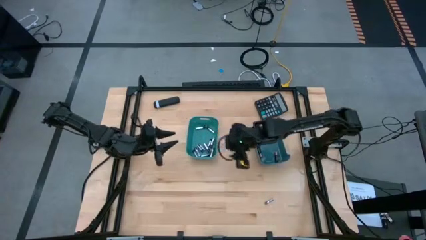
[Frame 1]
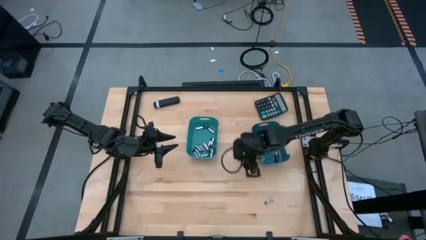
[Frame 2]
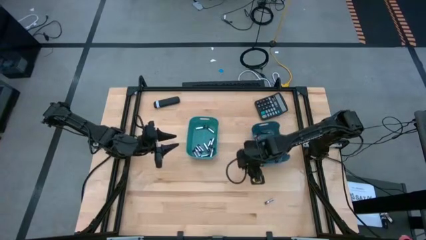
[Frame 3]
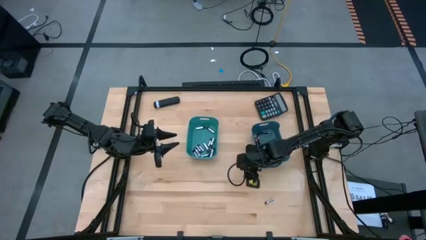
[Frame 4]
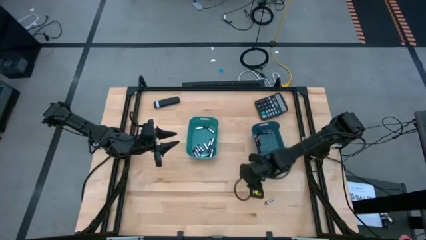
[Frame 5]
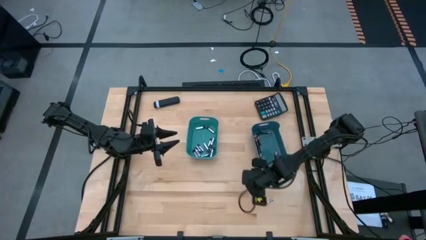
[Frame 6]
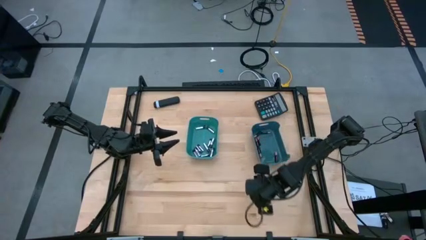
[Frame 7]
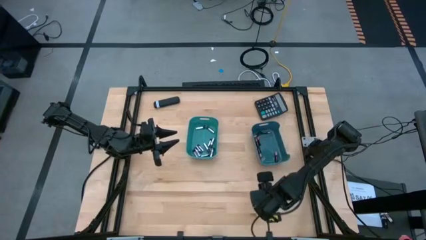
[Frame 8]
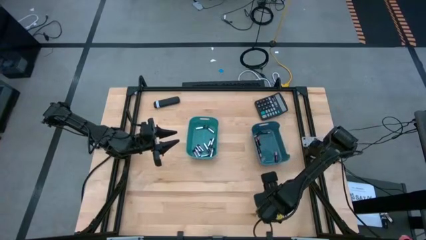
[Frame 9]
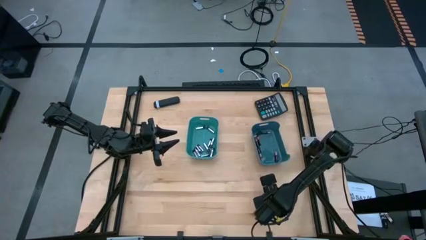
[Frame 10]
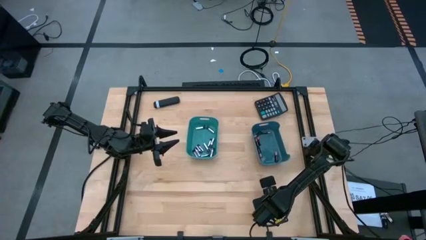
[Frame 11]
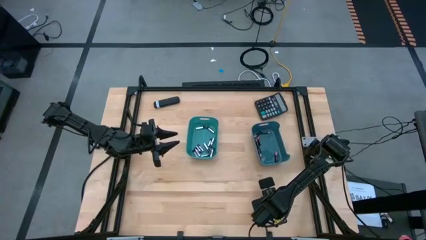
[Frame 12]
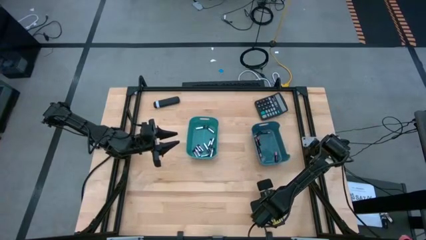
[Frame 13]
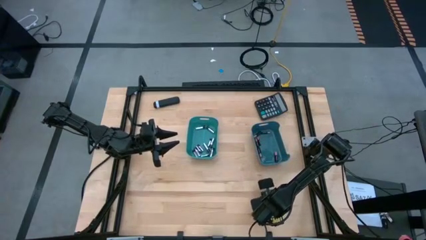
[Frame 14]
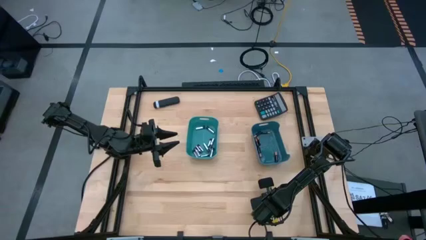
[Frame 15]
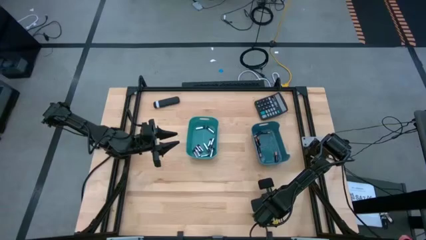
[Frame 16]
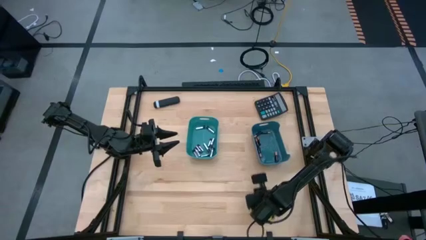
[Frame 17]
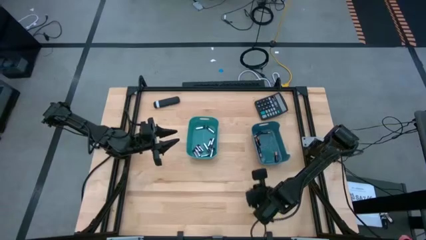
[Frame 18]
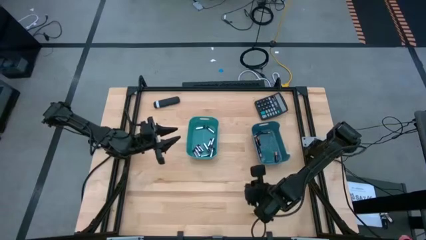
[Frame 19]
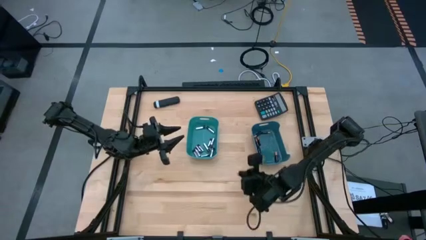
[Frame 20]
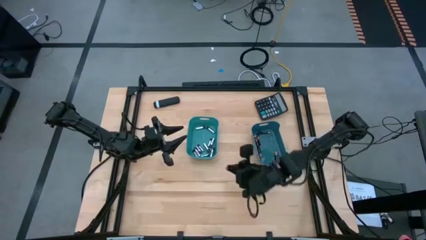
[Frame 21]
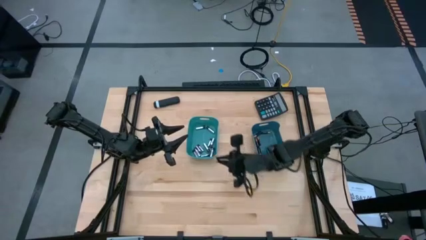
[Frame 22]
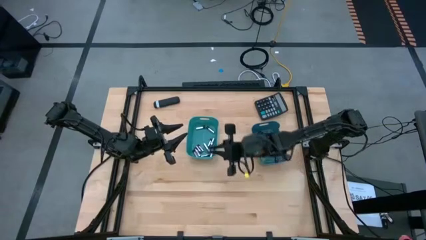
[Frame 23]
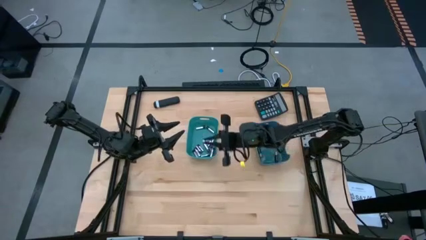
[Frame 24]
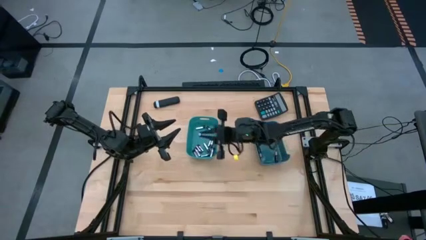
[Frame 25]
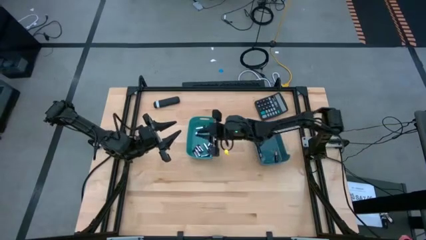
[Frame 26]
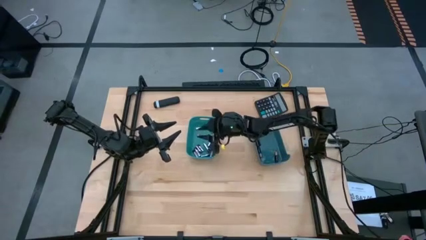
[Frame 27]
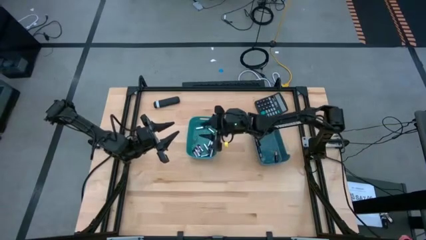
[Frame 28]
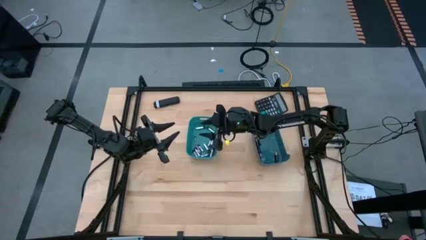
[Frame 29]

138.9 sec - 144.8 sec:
Task: Sort batteries
Put the silver battery into the green bin

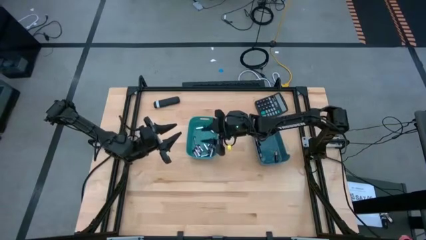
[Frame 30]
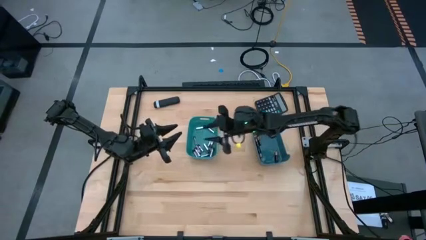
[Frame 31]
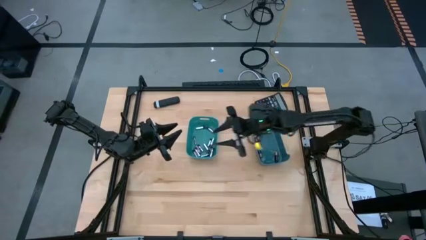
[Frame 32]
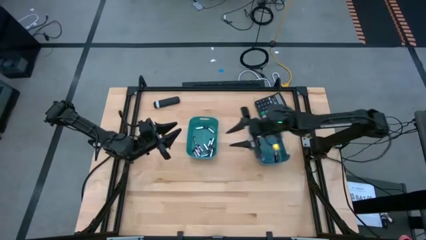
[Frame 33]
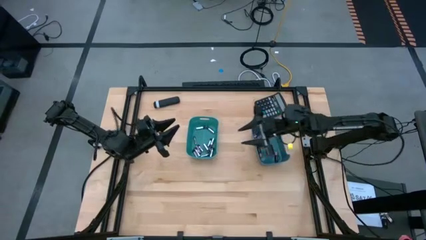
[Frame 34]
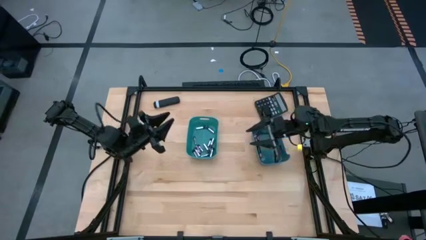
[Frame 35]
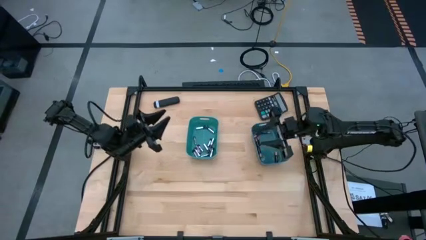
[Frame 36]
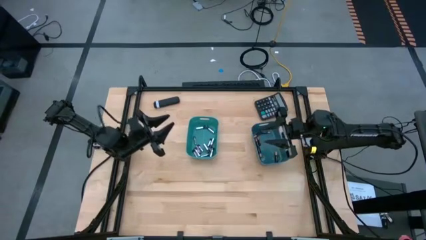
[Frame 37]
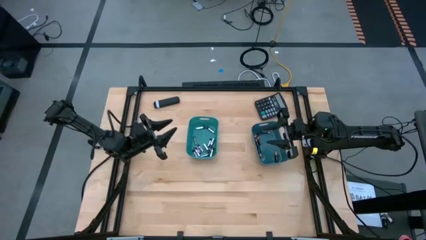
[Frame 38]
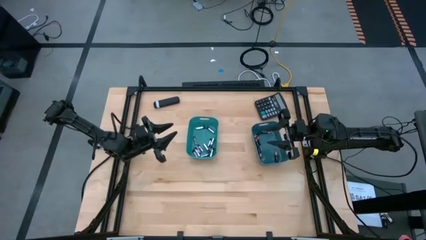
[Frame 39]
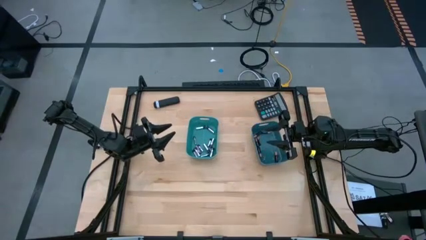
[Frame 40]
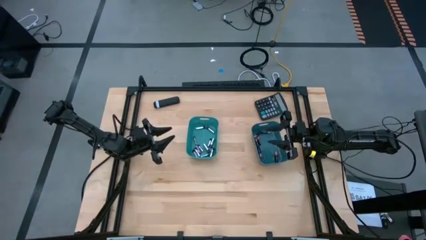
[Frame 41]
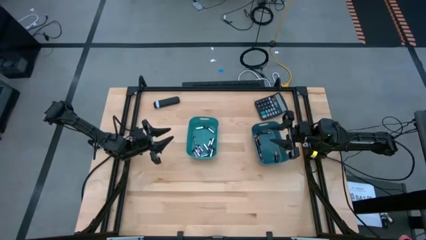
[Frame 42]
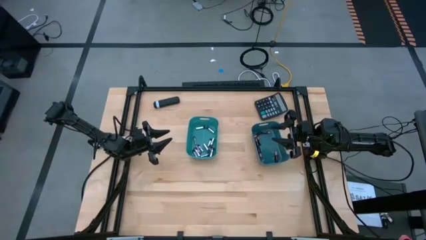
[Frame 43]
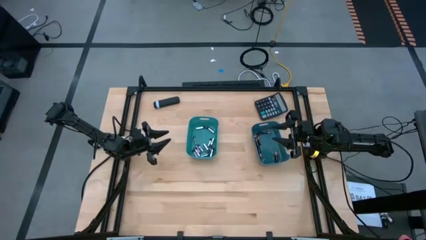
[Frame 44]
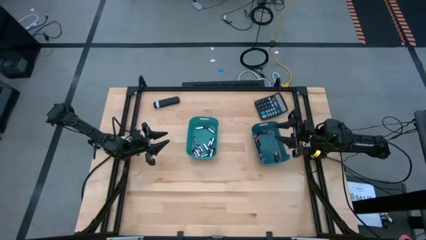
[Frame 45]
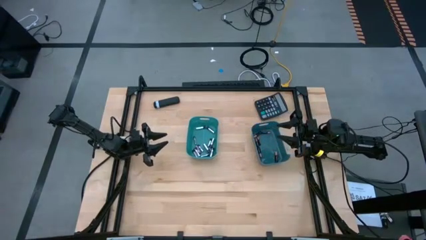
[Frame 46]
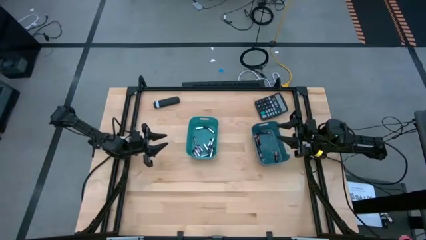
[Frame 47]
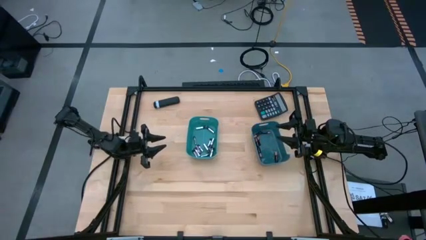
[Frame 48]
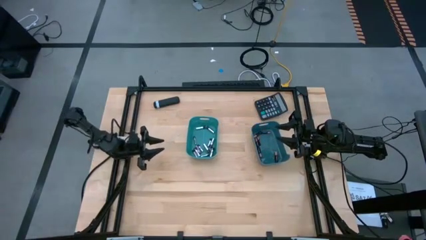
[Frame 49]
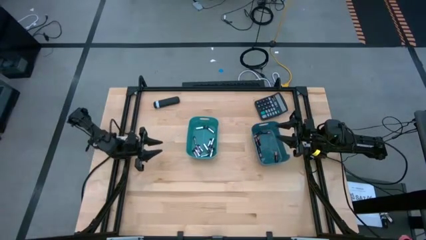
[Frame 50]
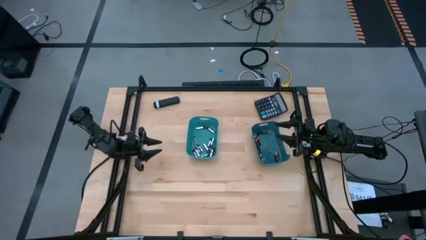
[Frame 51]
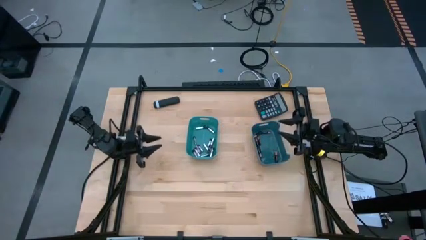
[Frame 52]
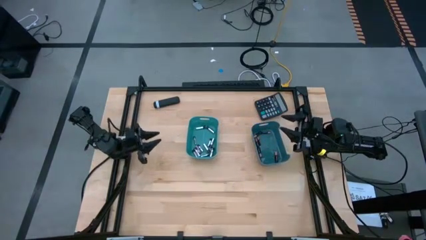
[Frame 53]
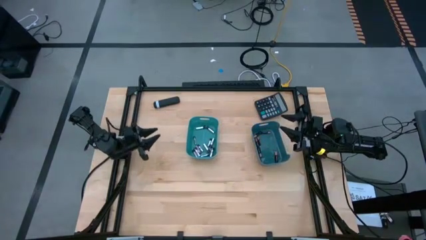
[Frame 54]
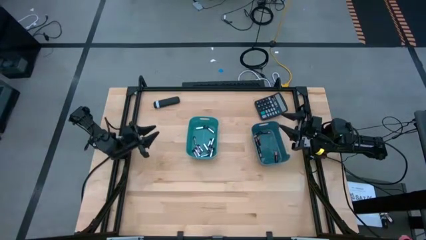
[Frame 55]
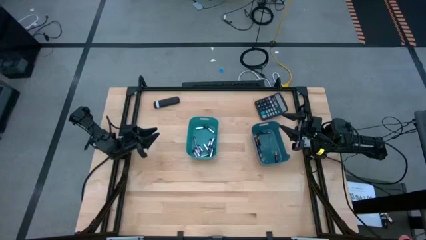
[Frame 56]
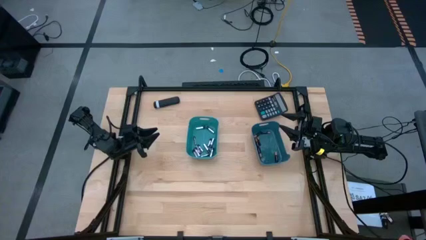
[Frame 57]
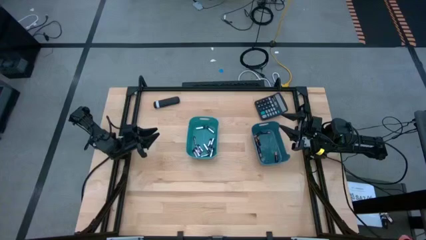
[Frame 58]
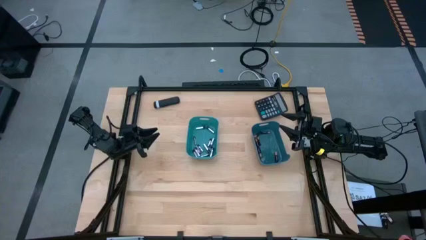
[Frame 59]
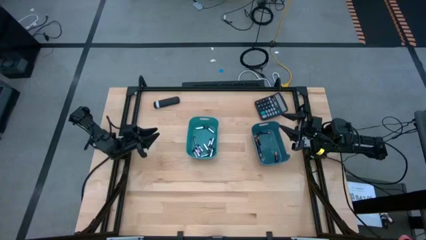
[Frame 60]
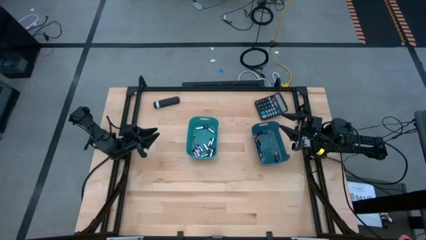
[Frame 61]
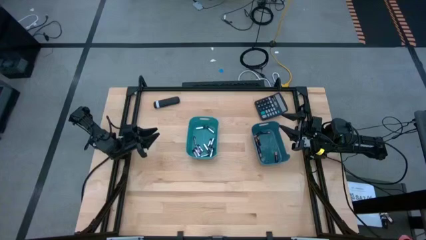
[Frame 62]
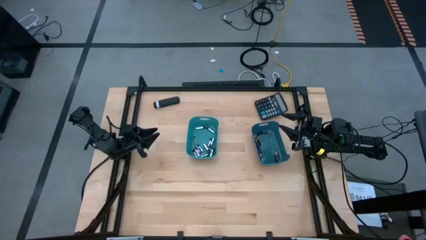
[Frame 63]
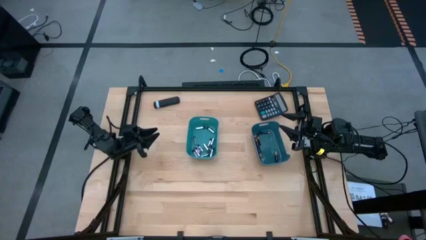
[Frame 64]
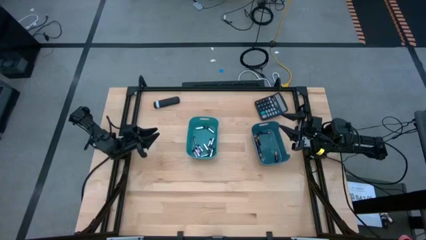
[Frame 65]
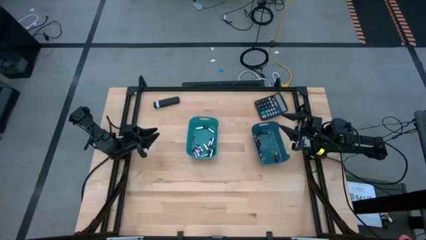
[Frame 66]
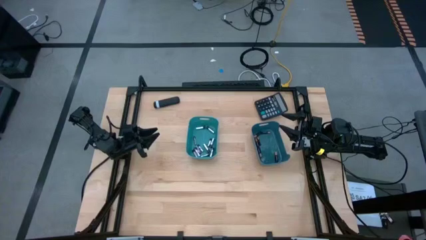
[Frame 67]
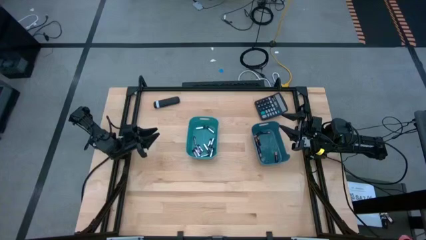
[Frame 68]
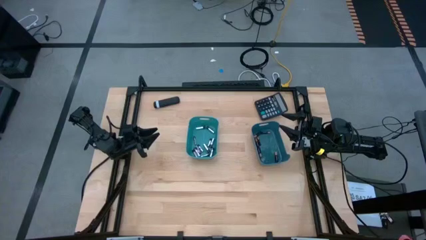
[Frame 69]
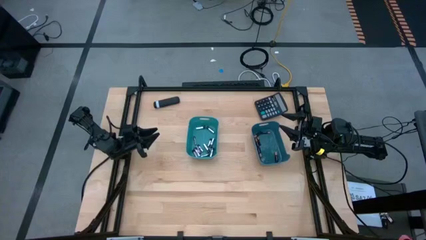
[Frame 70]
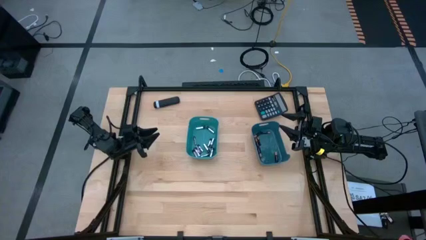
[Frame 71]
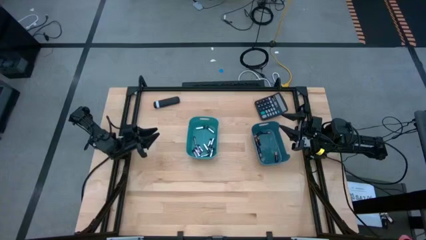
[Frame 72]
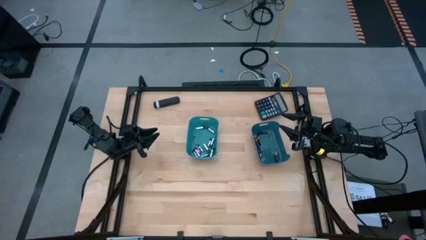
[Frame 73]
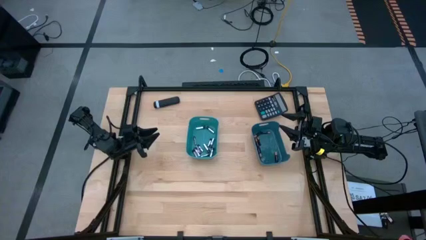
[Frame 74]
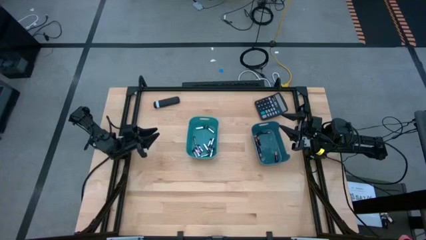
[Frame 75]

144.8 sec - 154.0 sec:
Return to Home position

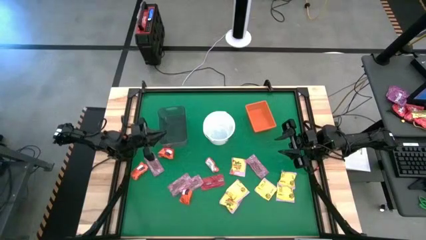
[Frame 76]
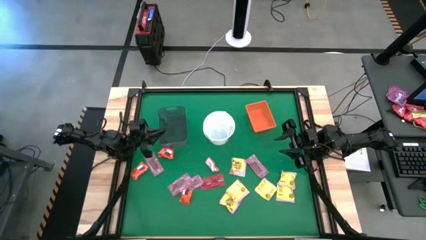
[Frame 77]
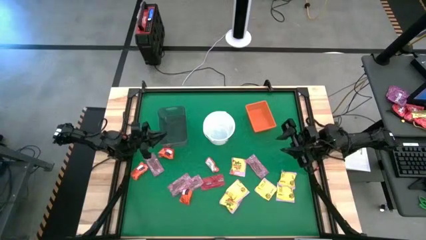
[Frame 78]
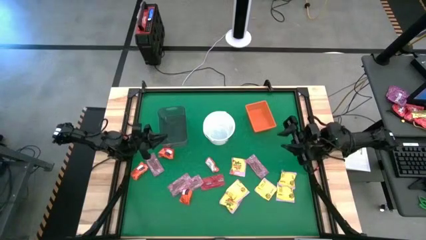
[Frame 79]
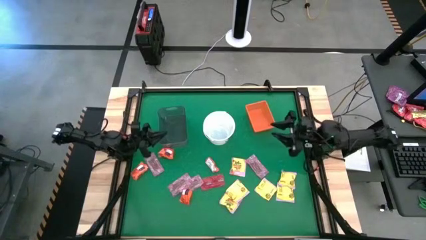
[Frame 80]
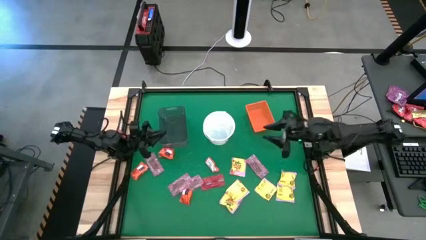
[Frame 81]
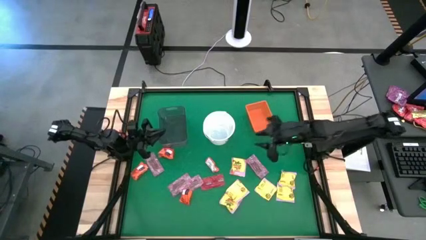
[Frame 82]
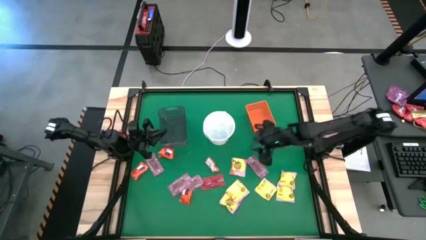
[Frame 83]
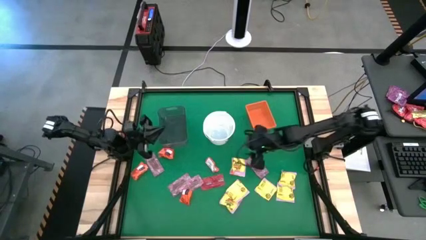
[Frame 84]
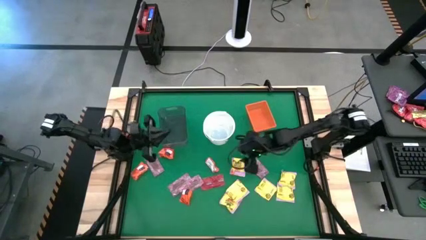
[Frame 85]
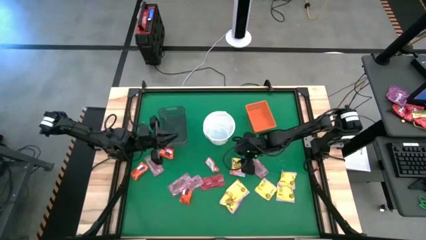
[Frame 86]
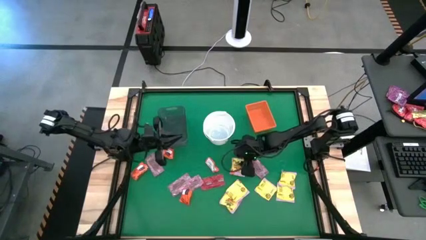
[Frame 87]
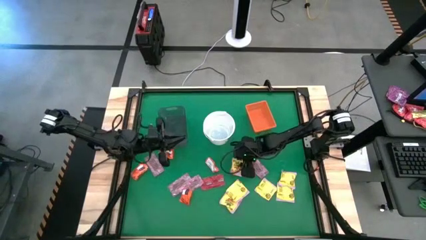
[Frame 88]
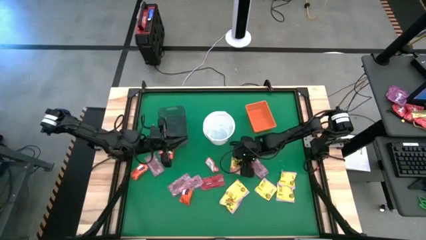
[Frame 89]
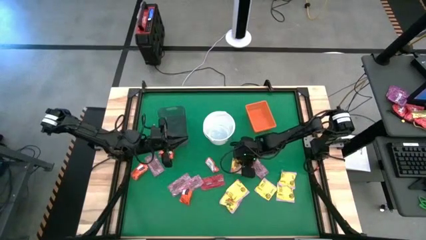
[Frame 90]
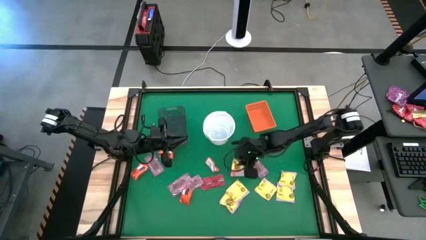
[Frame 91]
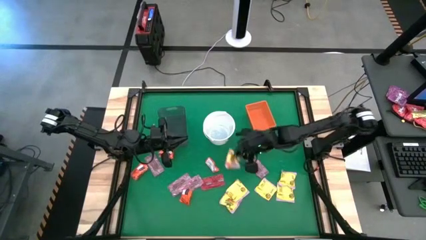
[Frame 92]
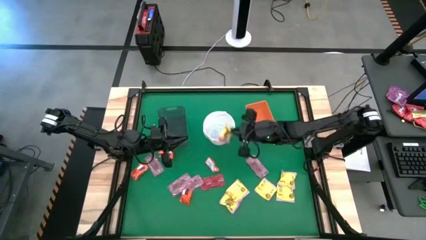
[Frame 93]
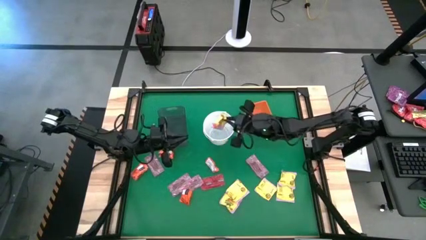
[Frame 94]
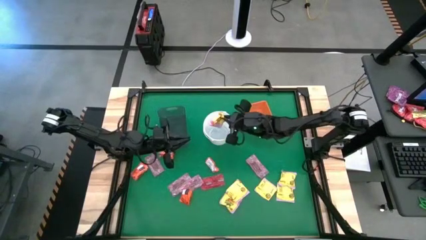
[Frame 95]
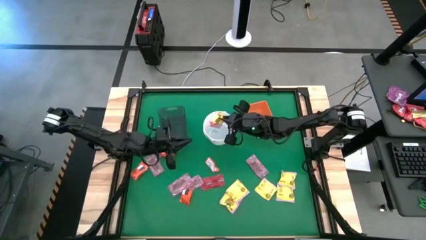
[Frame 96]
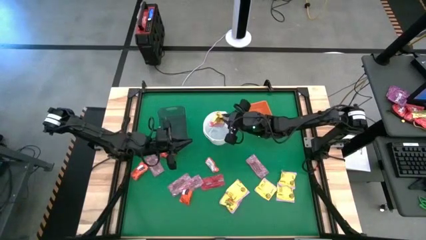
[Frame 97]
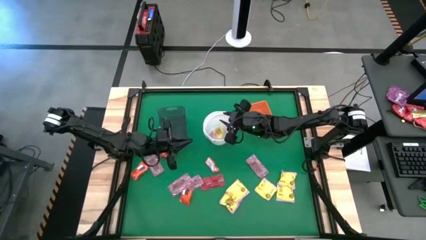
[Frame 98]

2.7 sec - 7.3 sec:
Task: Sort candy by brand, put in halloween buckets
Put the yellow candy into the white bucket
